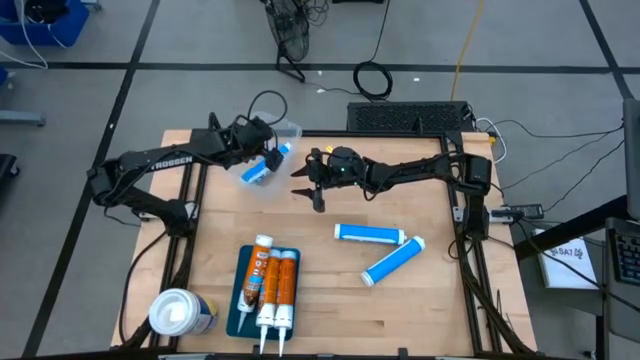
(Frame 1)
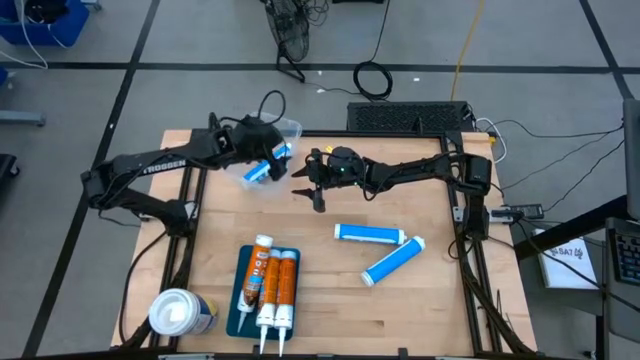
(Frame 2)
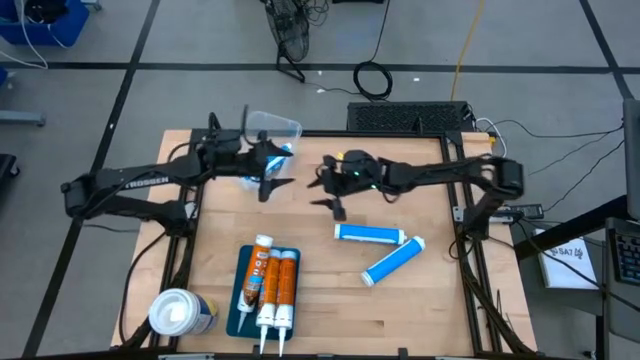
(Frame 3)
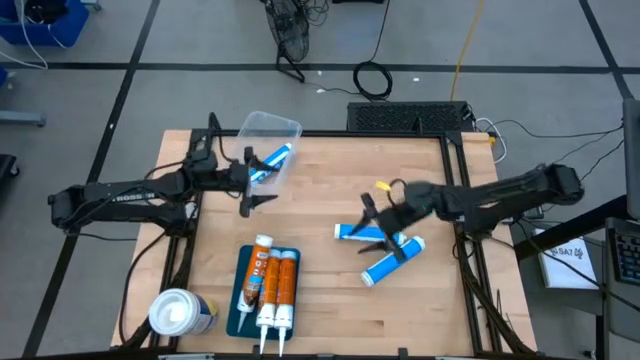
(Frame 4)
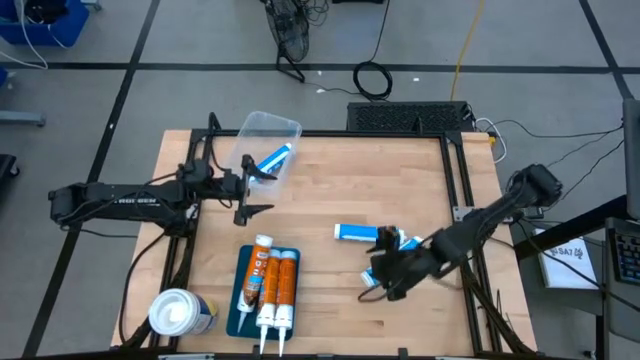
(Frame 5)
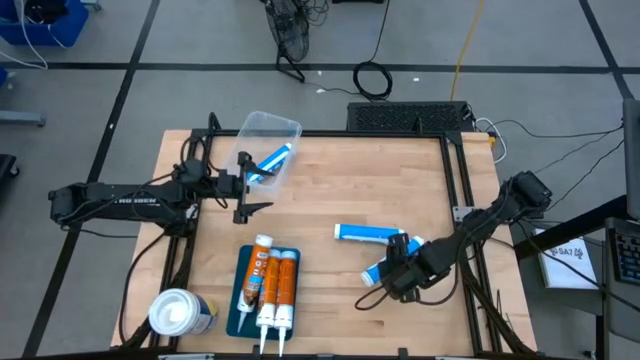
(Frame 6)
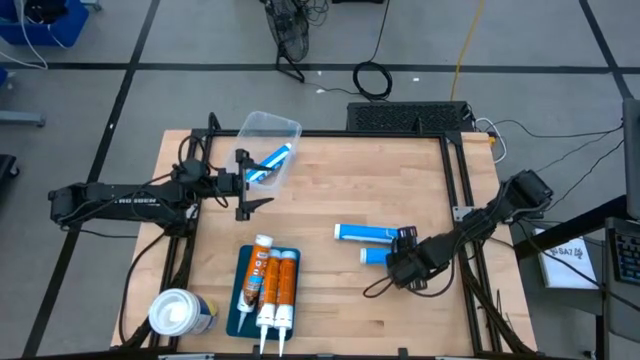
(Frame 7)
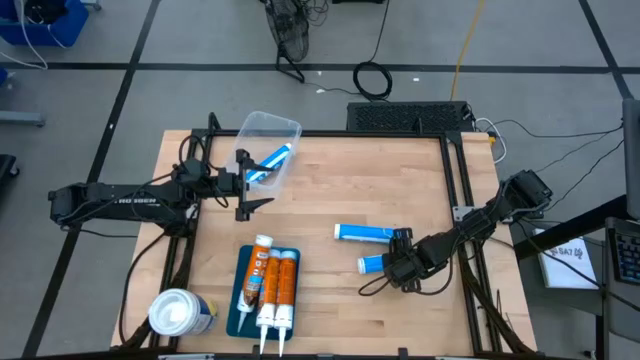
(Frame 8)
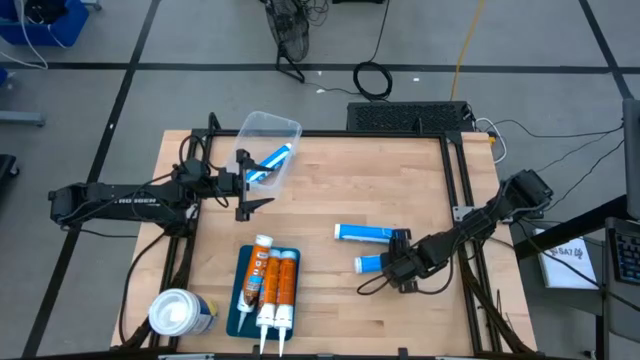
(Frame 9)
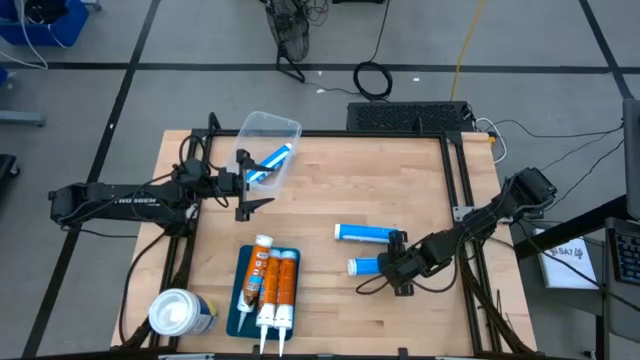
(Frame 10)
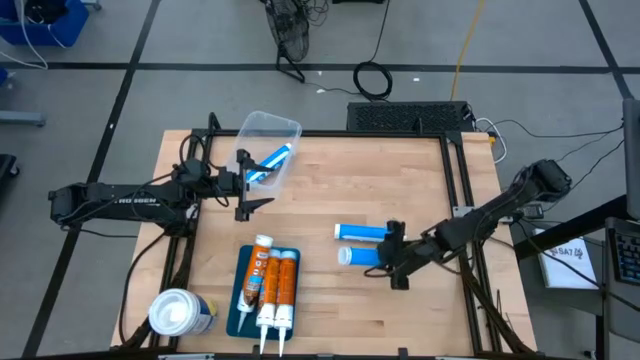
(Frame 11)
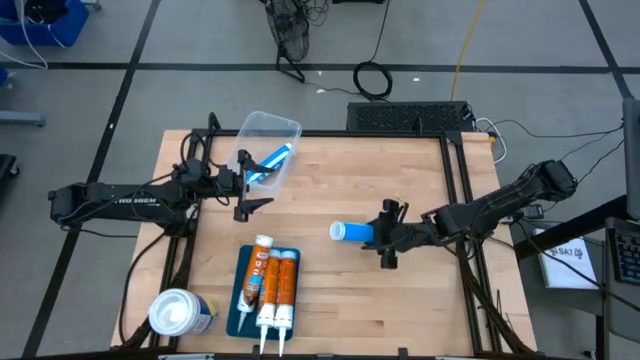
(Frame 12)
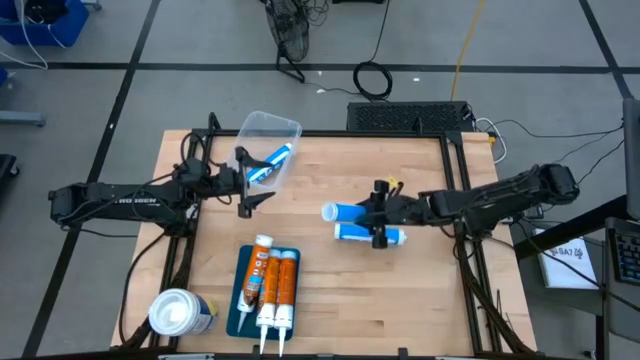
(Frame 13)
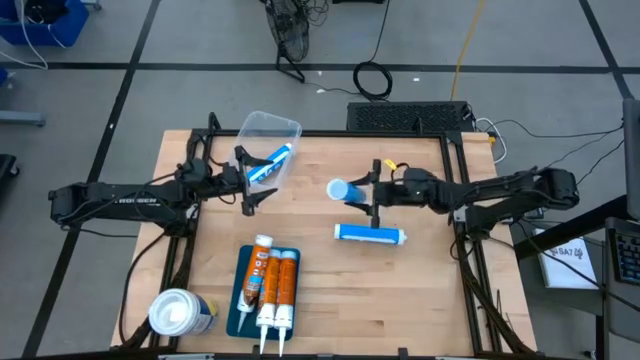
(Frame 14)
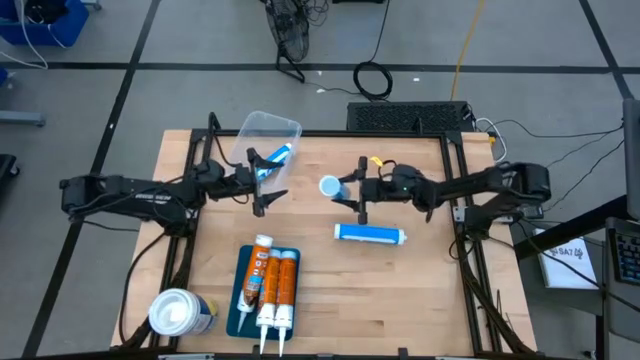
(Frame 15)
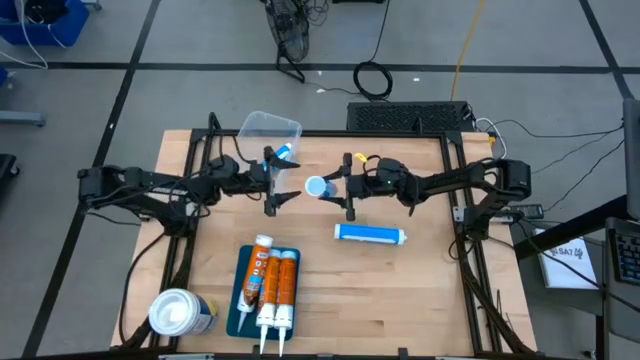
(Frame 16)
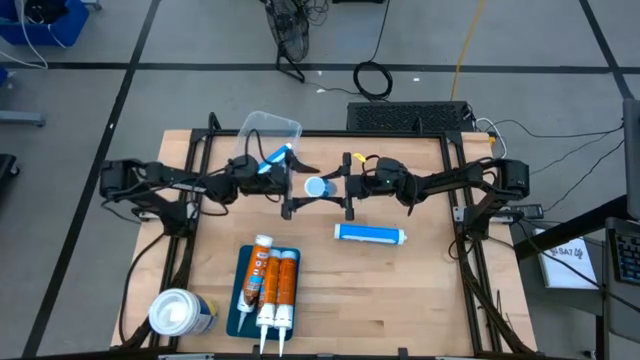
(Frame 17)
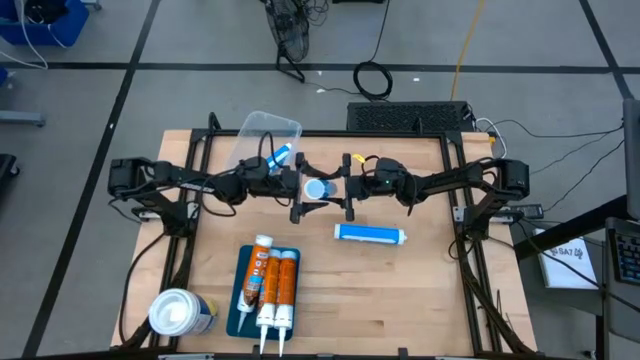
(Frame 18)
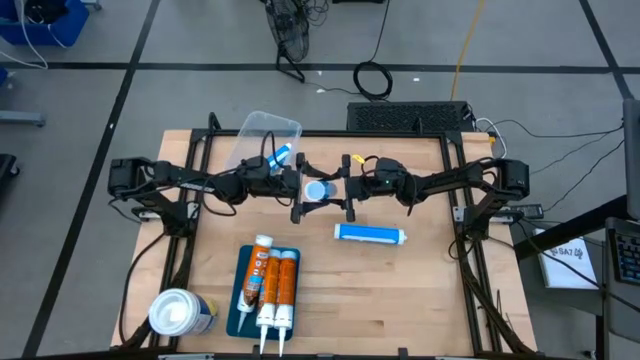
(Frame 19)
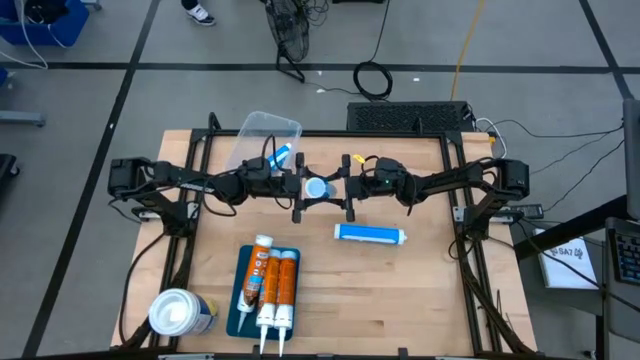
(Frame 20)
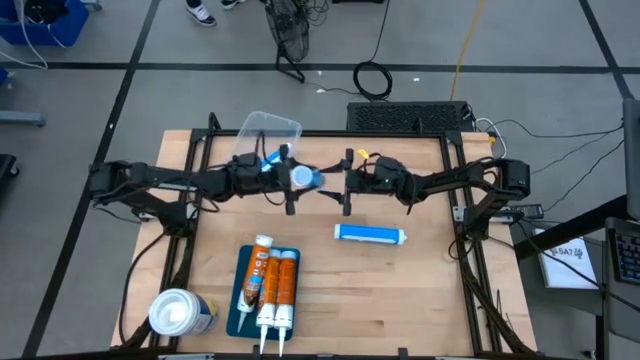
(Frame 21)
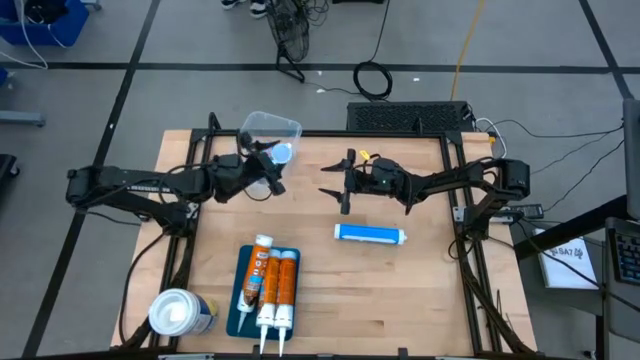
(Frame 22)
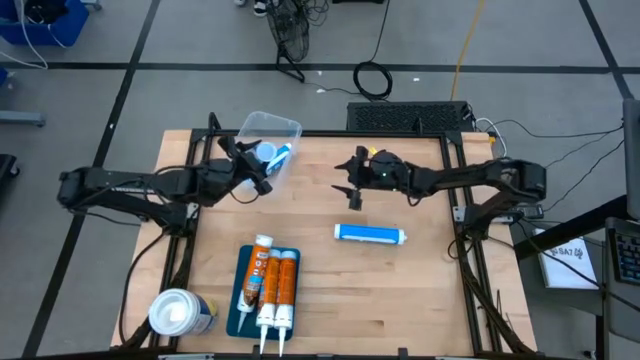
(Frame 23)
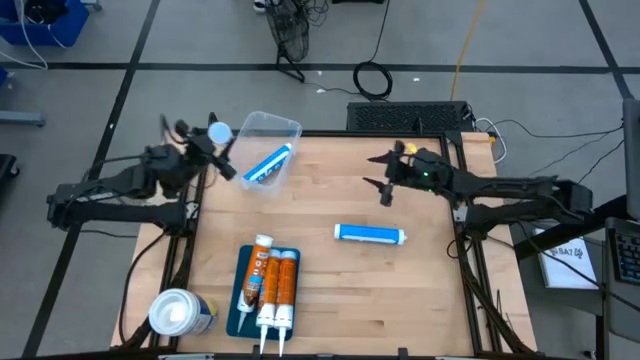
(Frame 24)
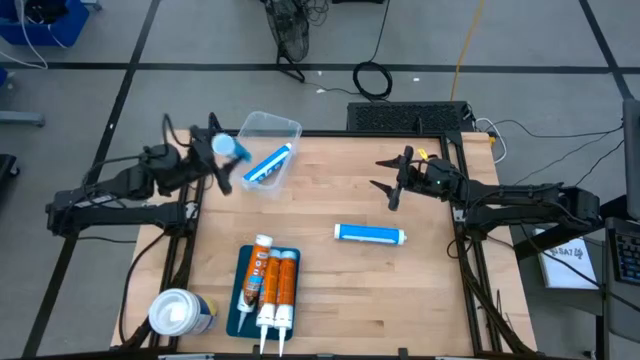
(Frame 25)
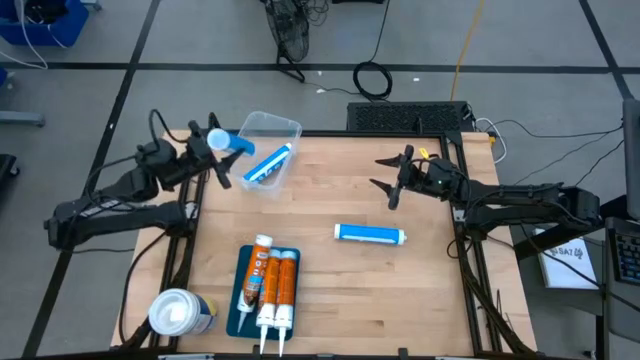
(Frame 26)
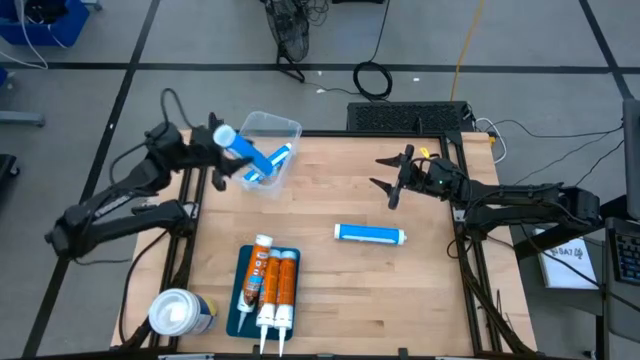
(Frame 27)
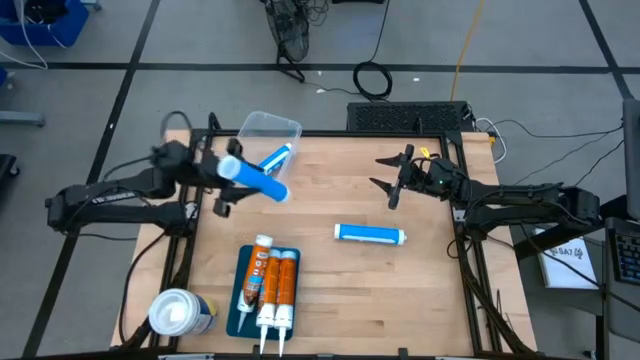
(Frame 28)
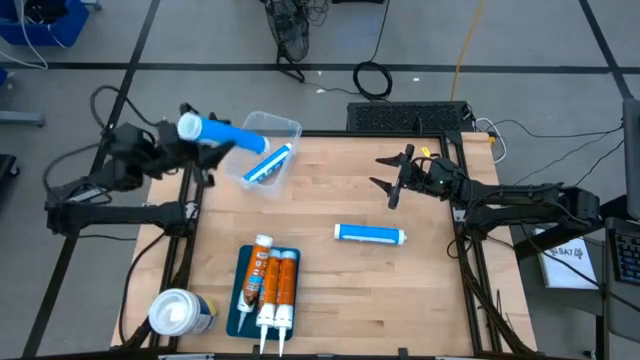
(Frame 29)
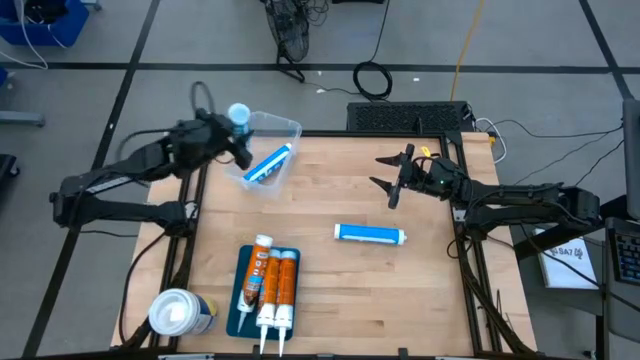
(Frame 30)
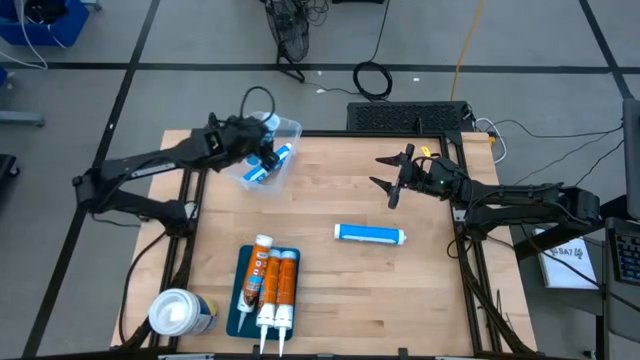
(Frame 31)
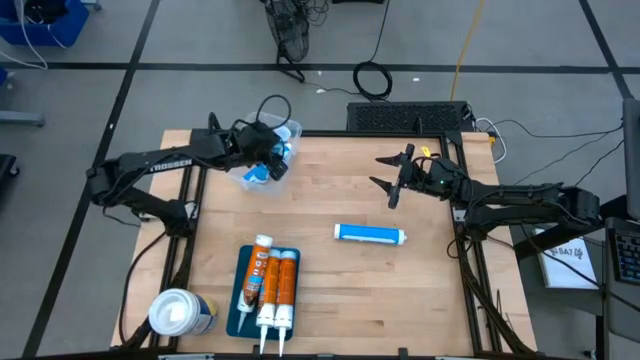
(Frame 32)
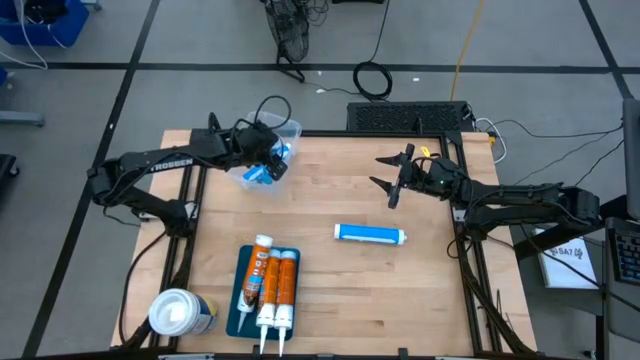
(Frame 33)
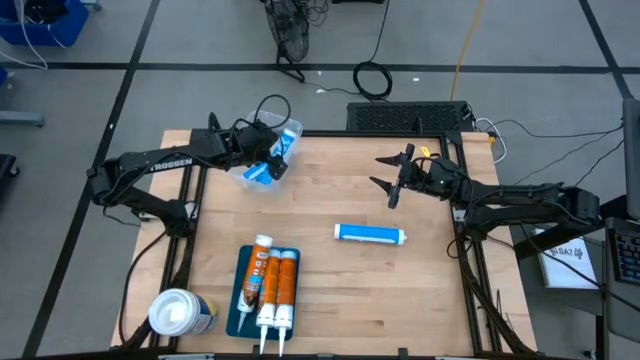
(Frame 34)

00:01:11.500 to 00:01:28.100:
Task: Pick & place silicon tubes, Sealant and Lysol wipes
Put the bottom blue sealant into the white bin

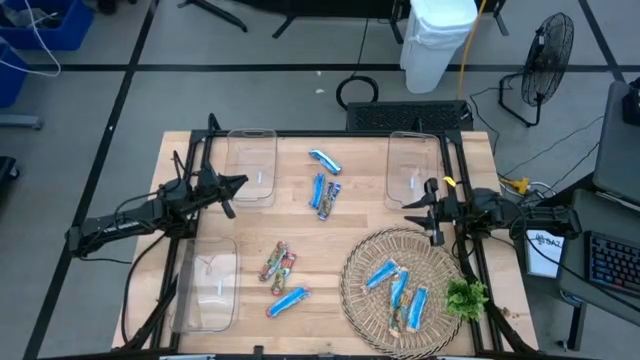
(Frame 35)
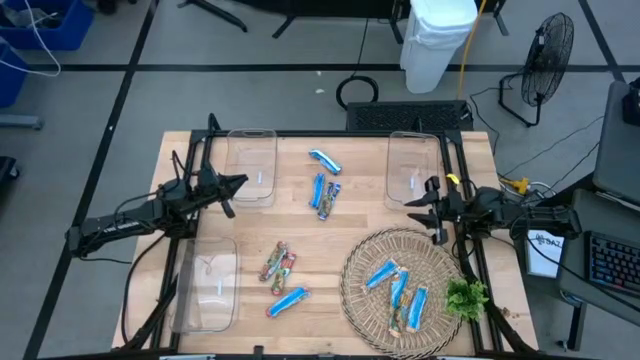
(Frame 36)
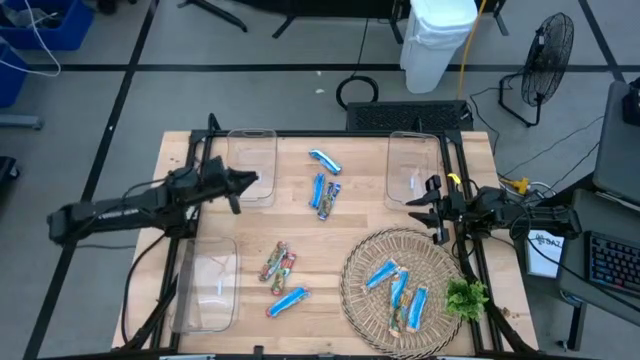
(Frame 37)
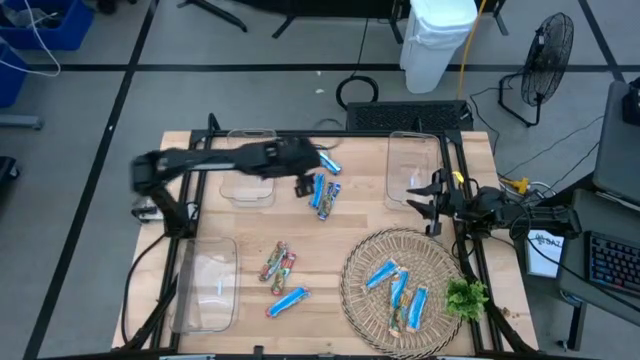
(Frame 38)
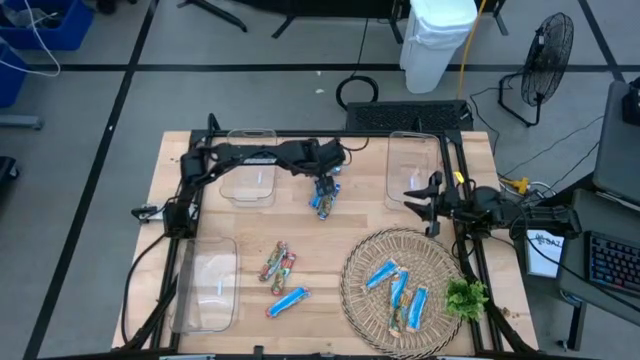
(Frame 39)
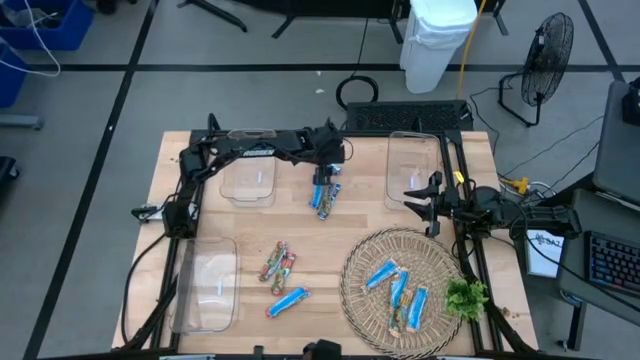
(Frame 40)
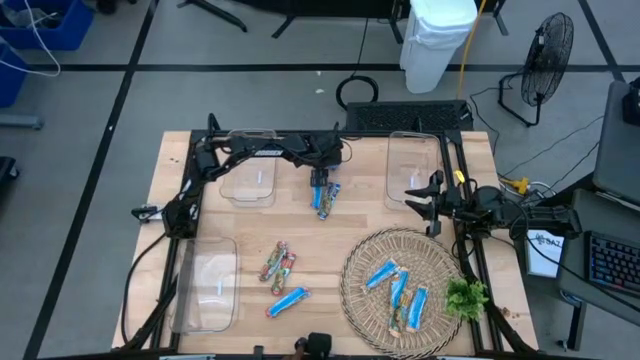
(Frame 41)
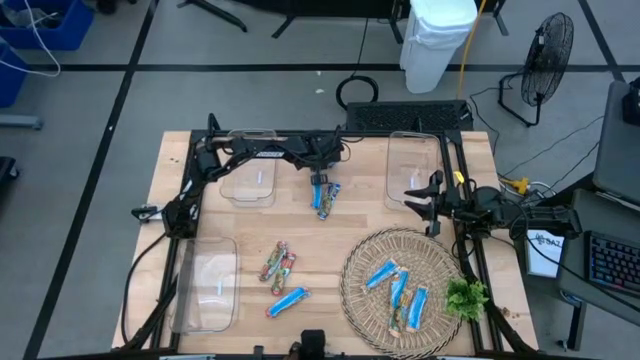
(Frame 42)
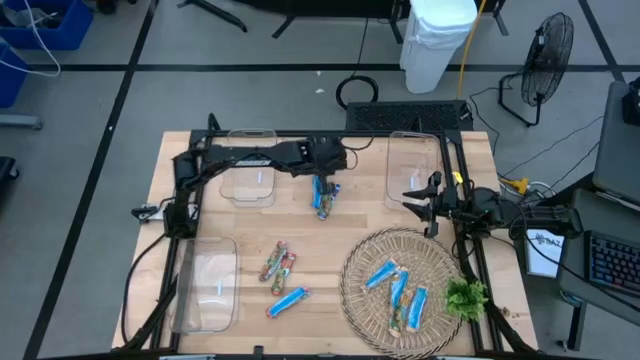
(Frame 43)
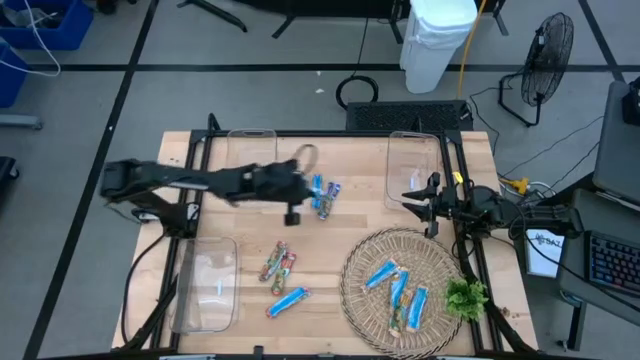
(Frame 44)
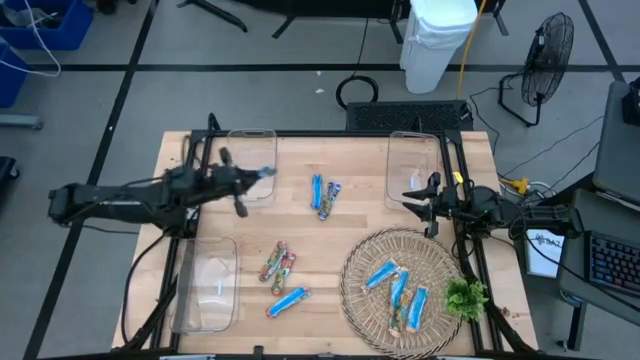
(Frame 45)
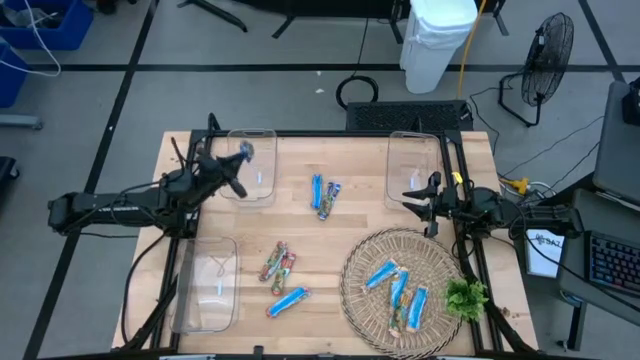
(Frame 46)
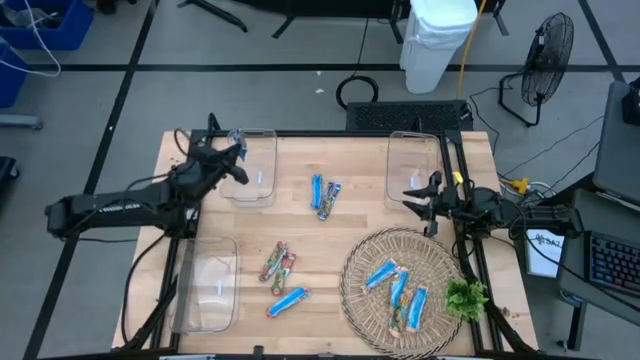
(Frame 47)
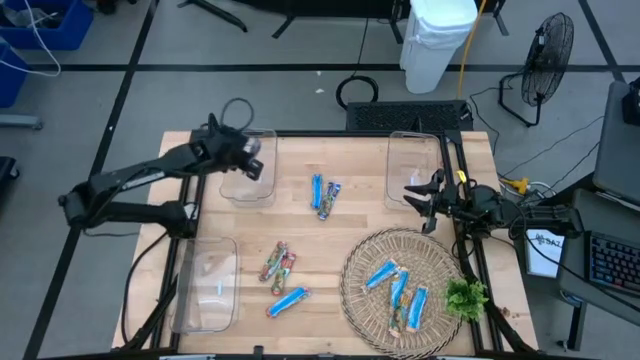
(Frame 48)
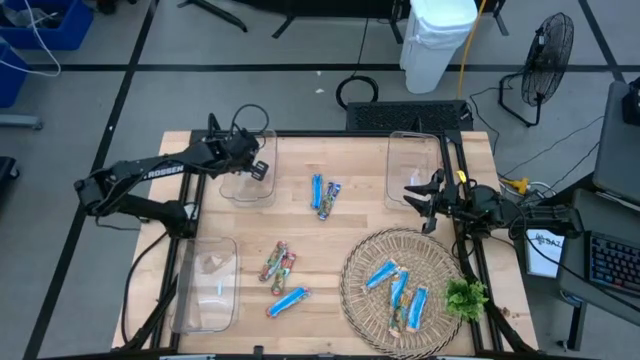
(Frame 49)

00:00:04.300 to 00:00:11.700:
Task: Pick and place Granola Bars by type
Put the blue granola bar into the top left transparent bin
